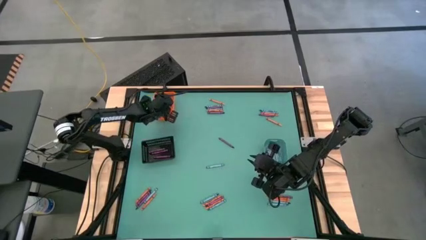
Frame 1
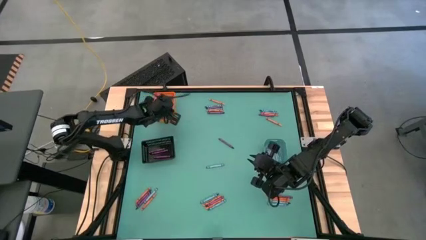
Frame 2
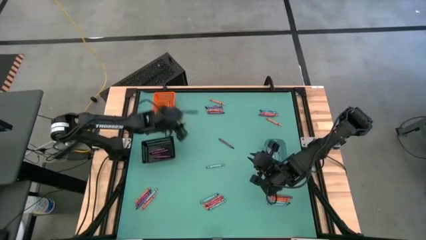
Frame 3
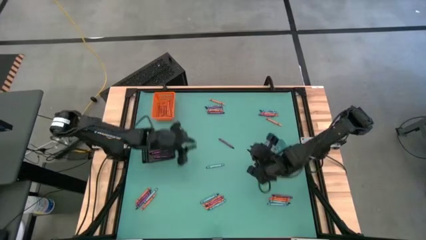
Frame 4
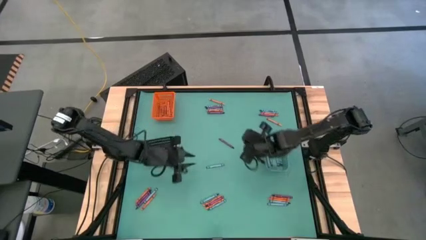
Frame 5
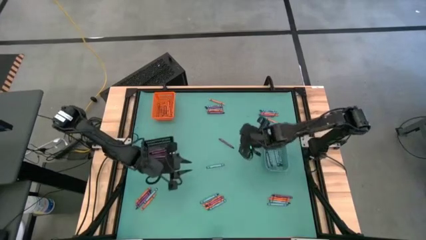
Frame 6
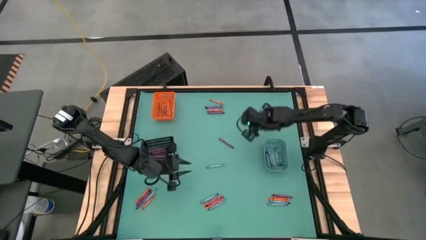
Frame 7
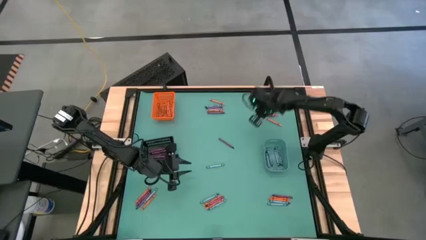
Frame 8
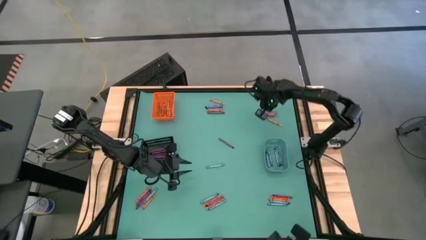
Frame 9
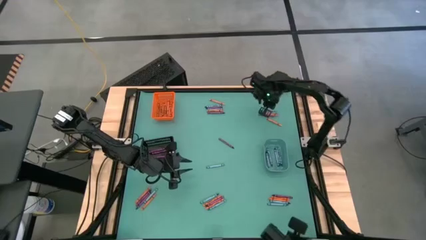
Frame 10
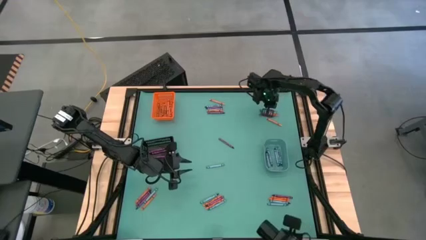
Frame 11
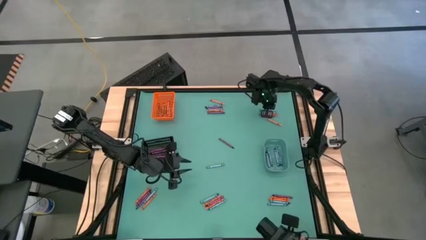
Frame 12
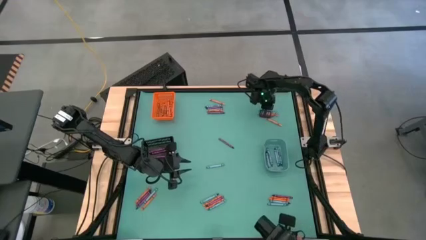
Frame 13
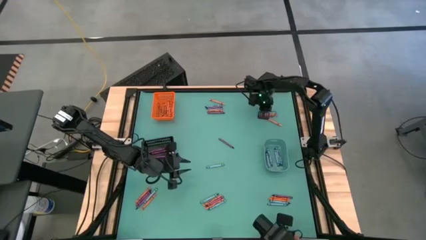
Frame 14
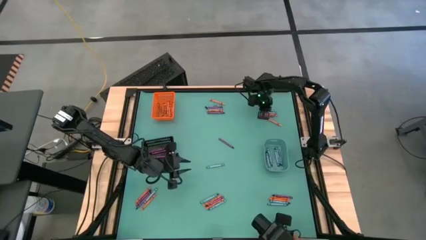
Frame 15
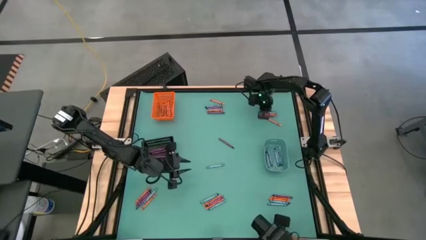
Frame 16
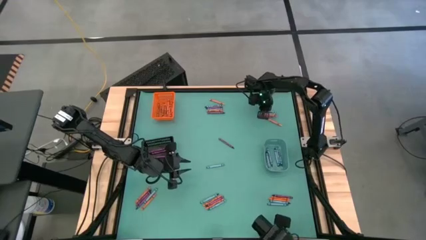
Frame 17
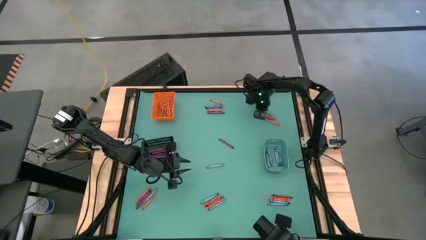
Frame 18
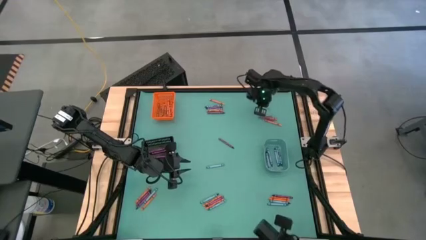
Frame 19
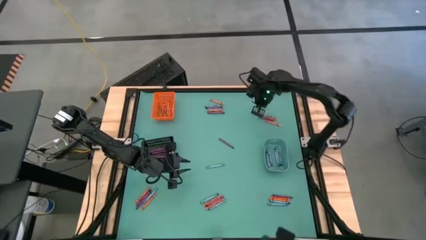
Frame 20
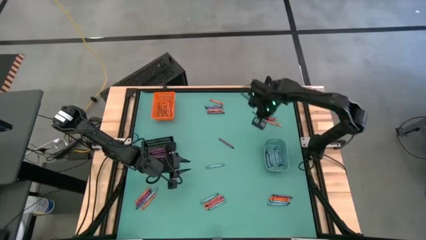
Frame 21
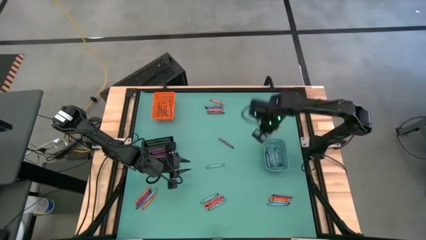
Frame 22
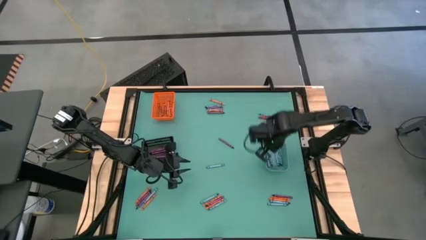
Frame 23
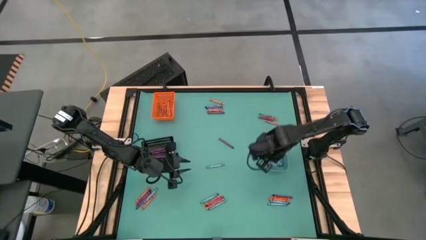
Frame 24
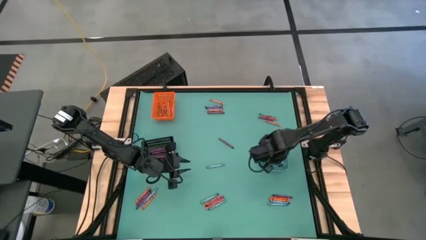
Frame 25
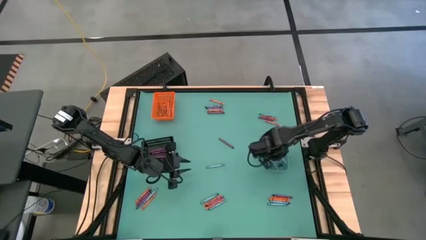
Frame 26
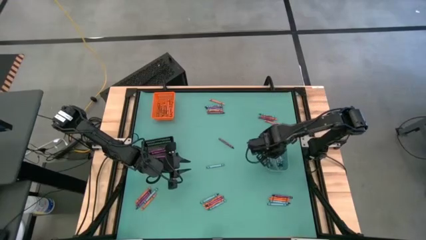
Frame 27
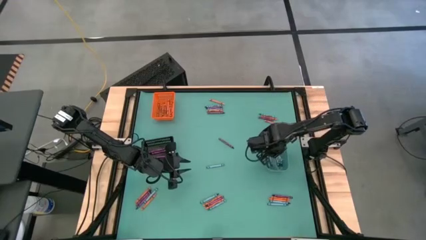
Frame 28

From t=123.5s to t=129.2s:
Task: Sort crayons
Put the light blue crayon into the blue bin

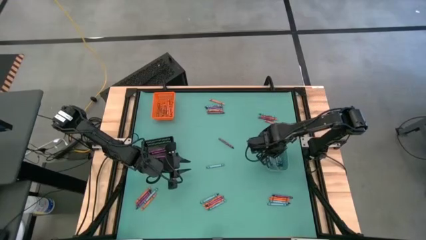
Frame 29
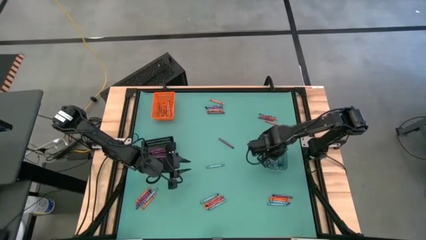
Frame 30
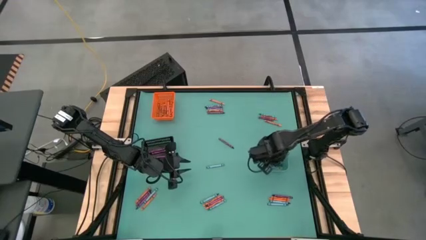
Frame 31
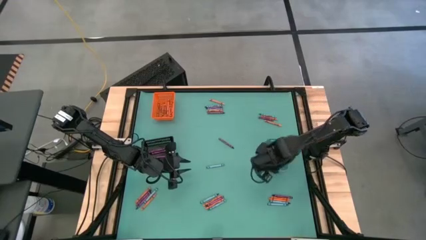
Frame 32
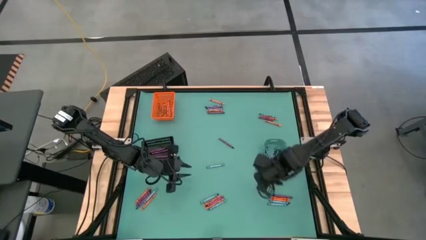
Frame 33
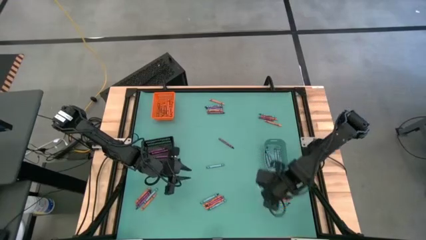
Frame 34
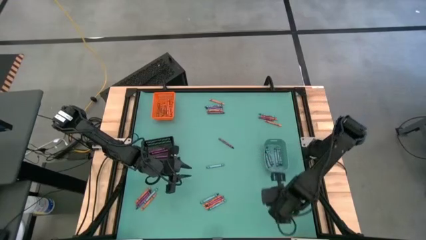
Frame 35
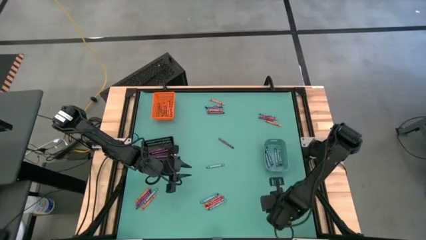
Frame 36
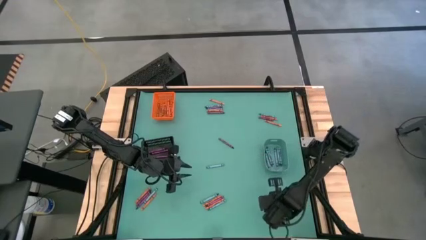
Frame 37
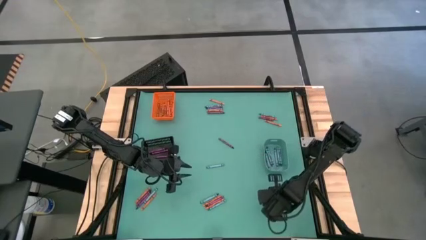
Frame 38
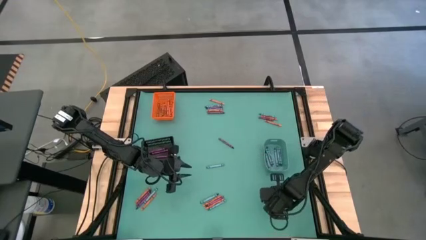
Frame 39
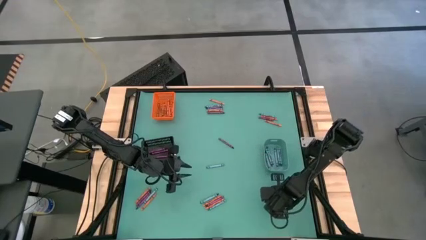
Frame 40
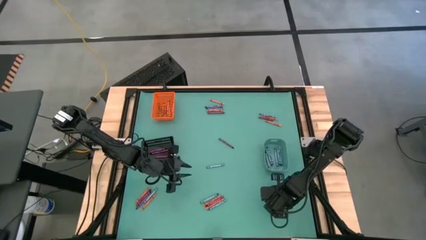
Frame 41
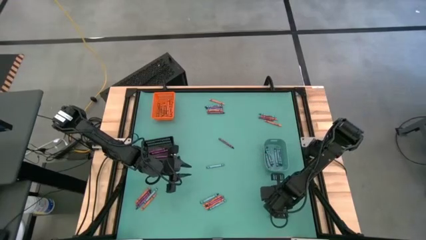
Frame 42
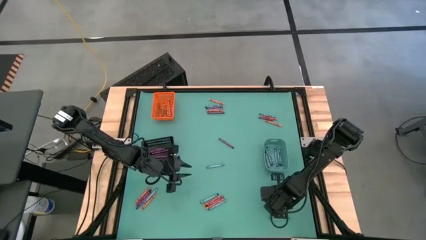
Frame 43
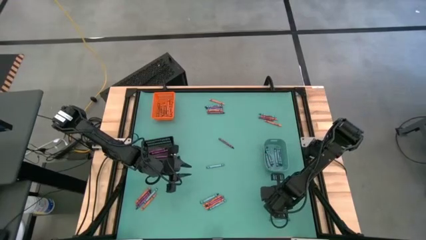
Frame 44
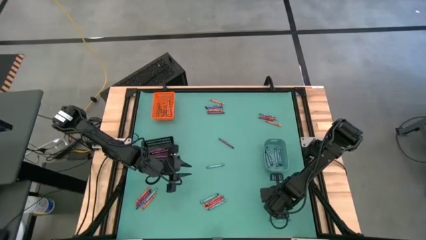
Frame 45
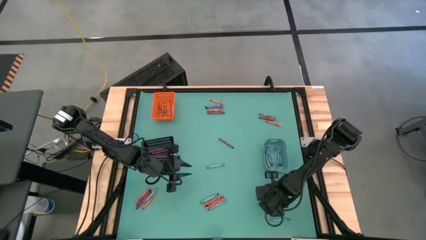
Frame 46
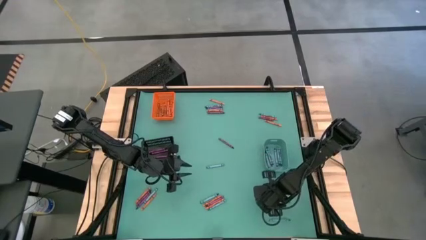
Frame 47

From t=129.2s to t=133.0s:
Put the orange crayon into the orange bin

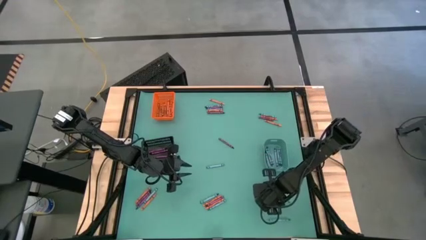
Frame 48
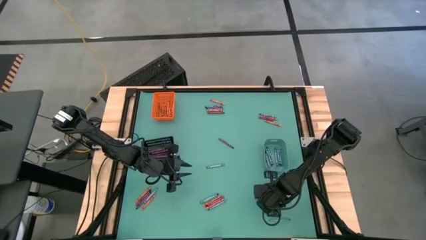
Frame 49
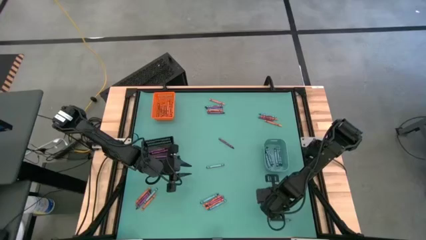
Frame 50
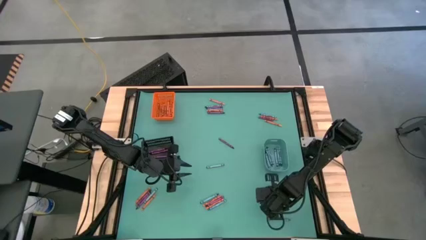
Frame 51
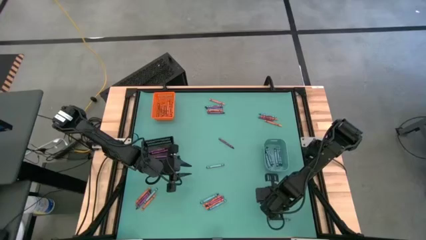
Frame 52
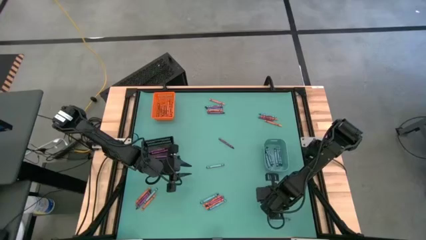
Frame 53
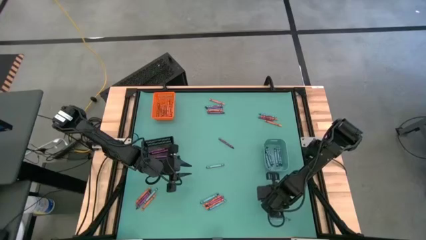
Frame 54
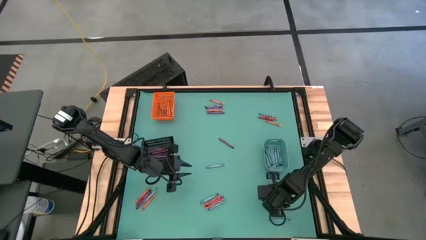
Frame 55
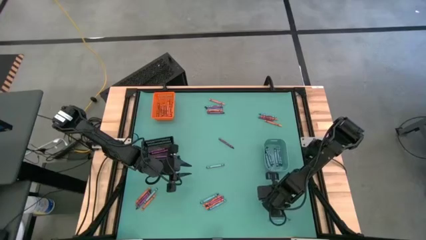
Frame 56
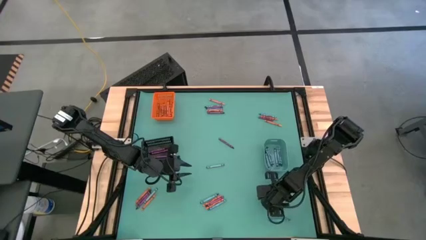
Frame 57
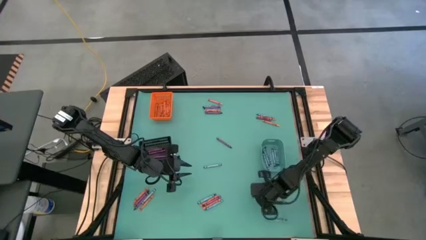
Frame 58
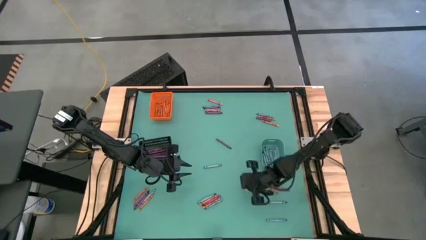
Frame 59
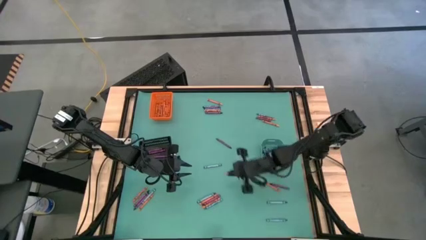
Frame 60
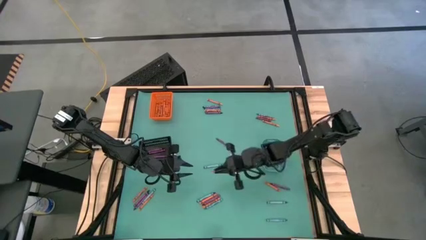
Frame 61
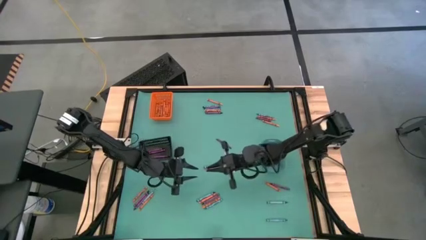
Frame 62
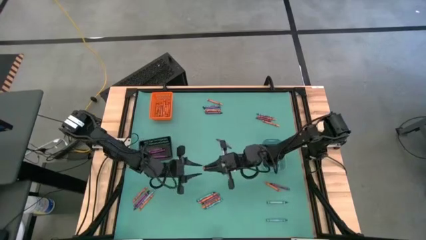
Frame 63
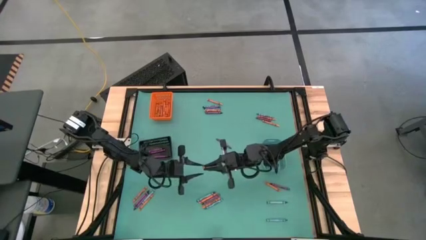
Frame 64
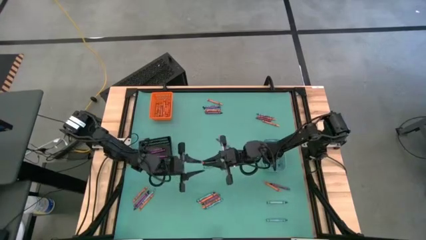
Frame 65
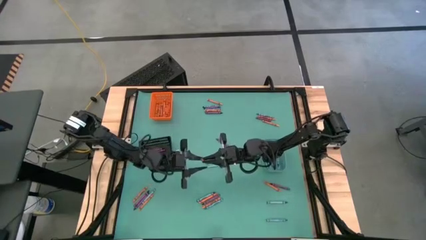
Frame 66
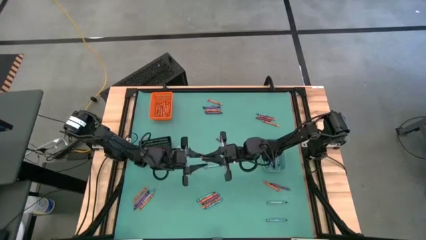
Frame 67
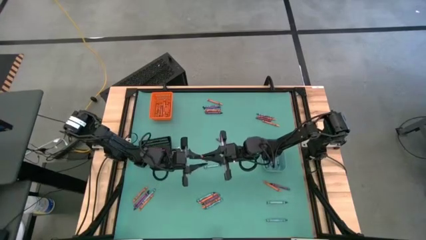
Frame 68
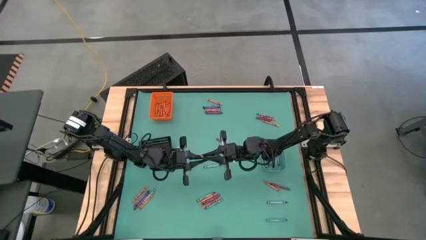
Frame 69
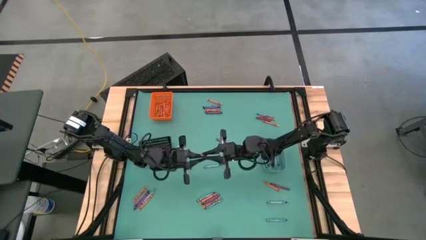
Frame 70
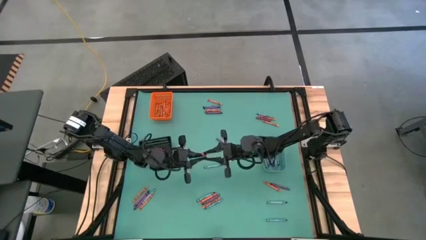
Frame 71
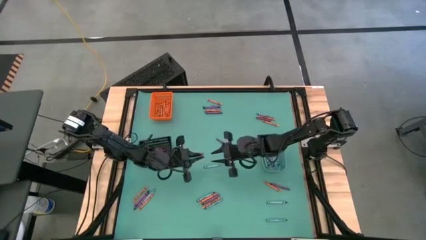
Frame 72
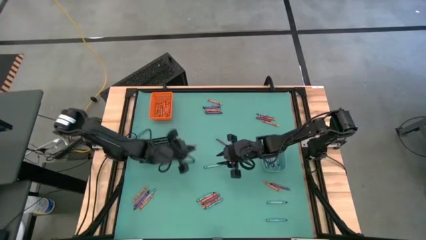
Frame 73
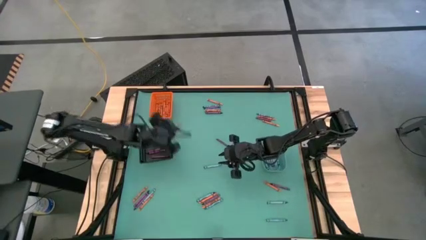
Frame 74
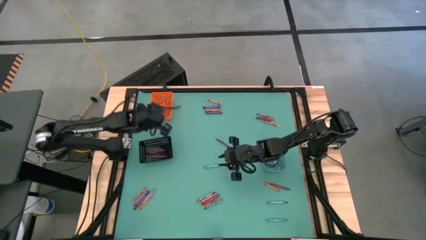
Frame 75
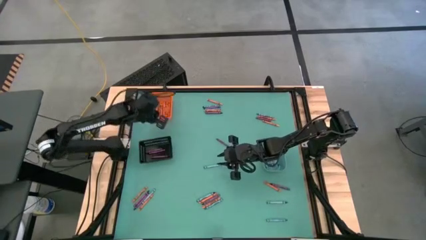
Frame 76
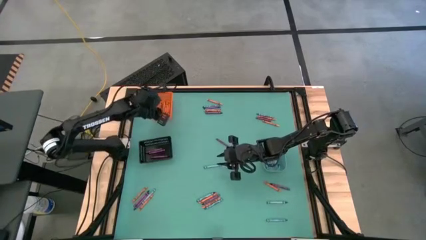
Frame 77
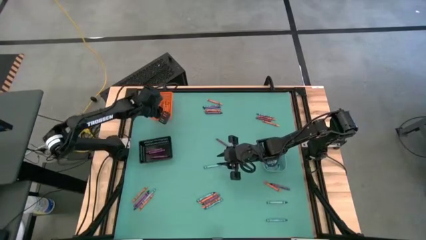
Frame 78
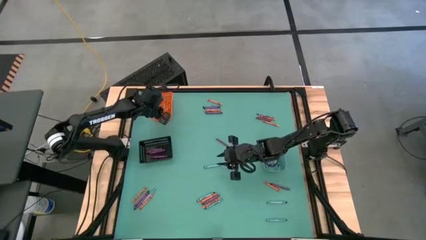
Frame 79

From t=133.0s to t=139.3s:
Put the orange crayon into the orange bin

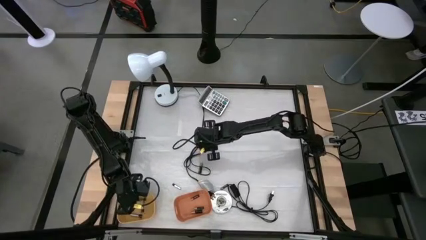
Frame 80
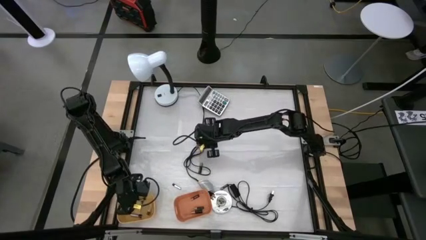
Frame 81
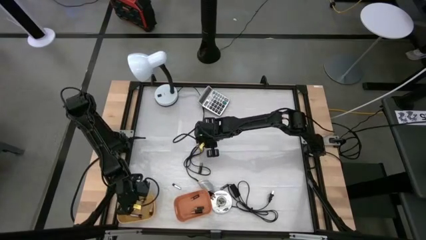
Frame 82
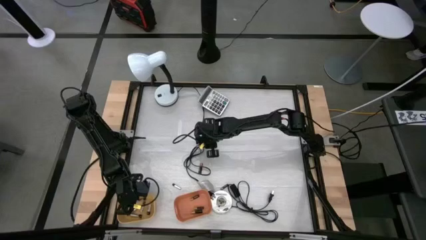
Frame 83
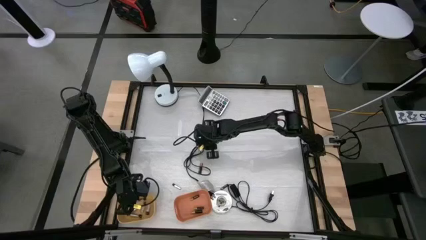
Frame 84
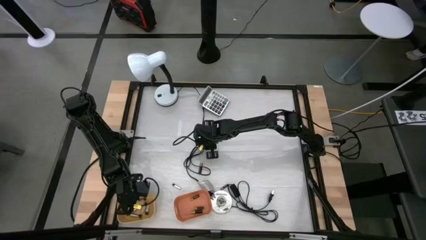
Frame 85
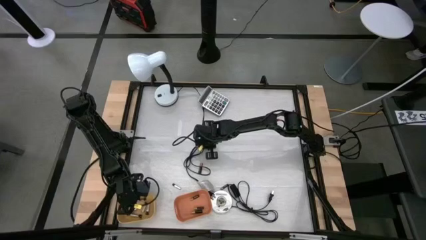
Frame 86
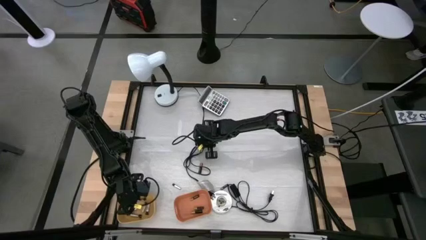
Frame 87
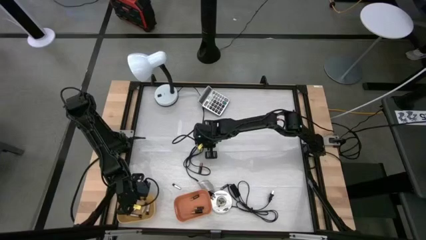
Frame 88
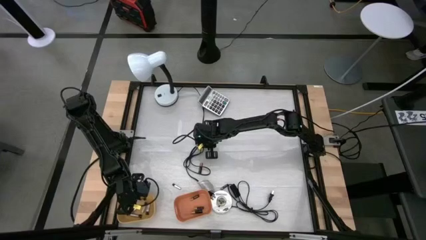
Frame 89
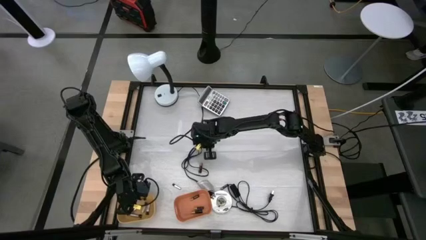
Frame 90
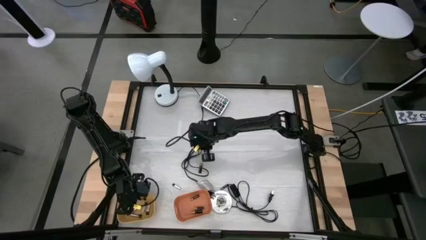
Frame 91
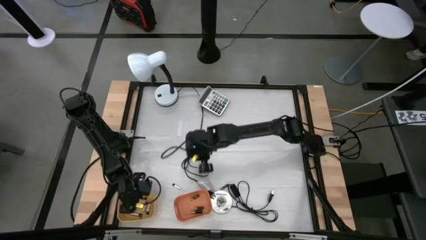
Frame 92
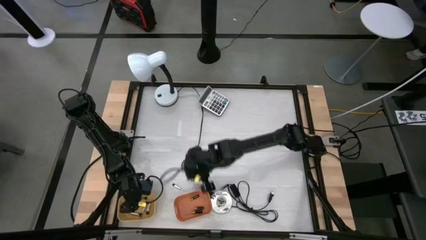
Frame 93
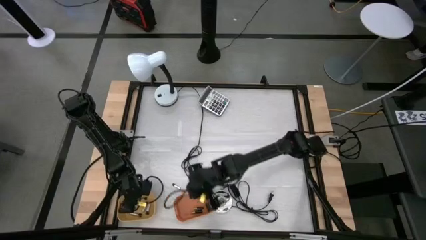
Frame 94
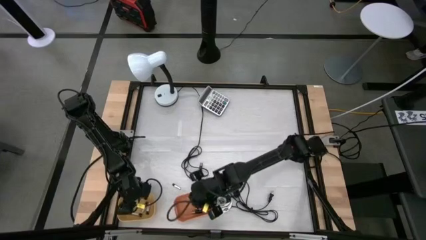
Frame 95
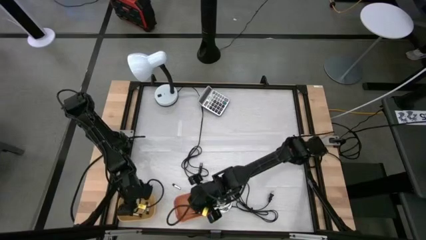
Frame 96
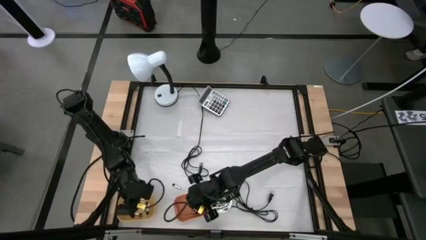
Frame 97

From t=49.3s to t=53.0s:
Task: Sort batteries
Put the black battery into the orange bin
